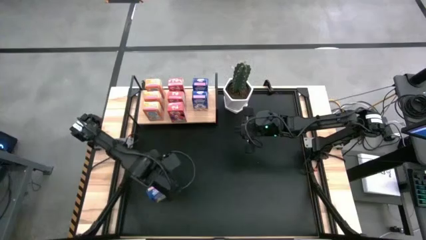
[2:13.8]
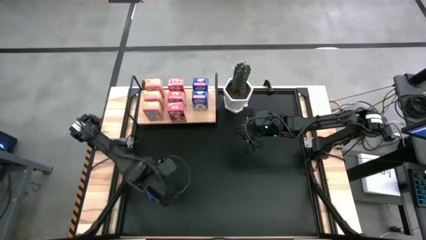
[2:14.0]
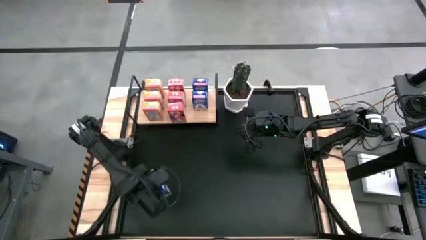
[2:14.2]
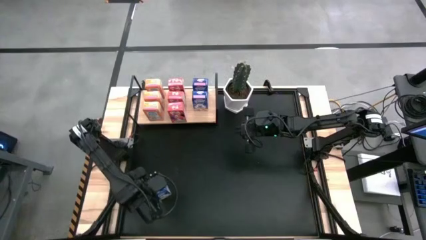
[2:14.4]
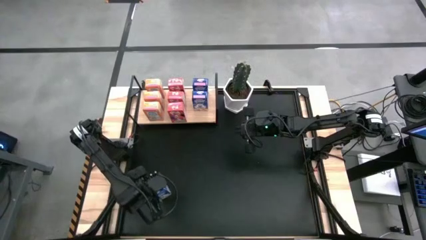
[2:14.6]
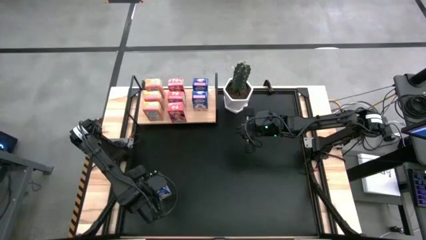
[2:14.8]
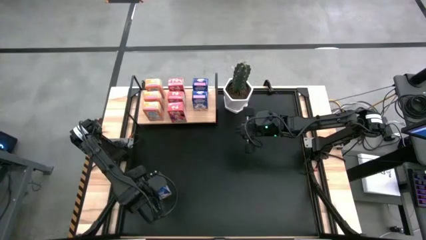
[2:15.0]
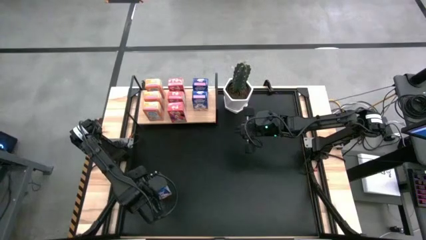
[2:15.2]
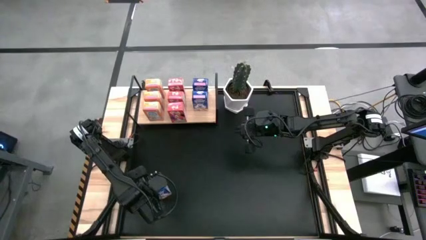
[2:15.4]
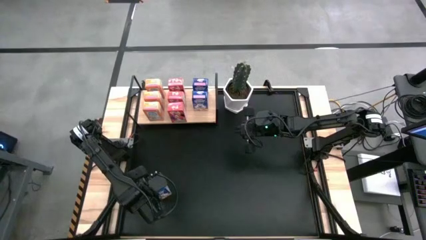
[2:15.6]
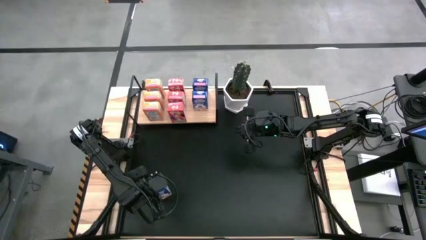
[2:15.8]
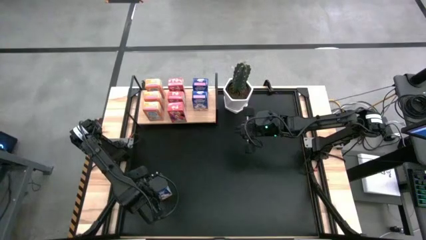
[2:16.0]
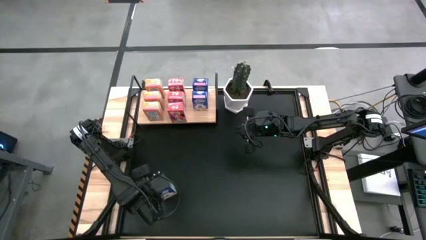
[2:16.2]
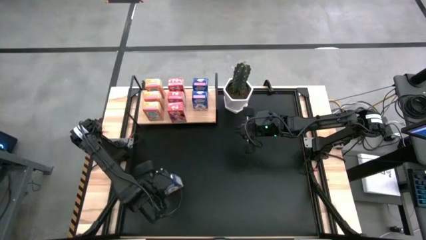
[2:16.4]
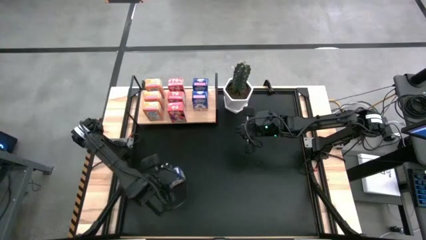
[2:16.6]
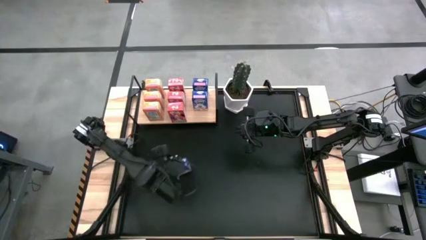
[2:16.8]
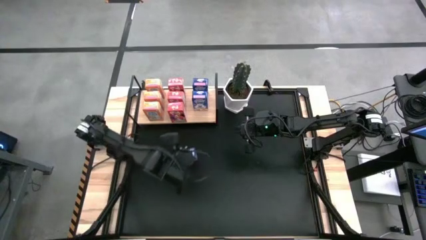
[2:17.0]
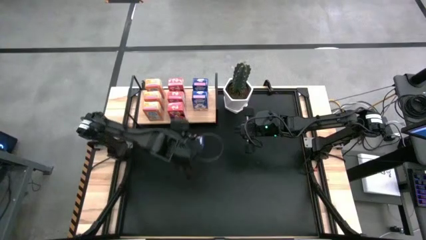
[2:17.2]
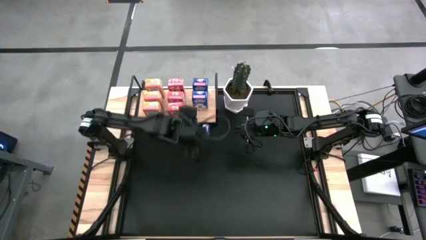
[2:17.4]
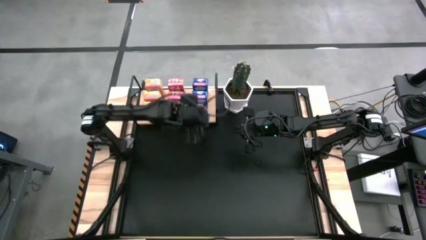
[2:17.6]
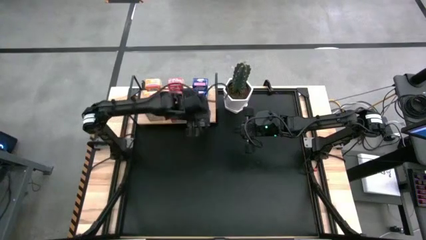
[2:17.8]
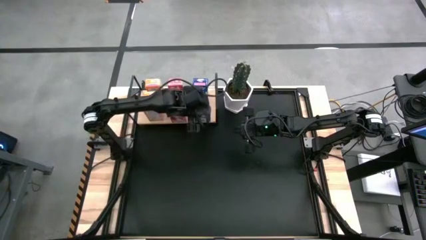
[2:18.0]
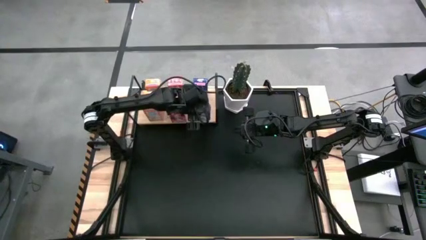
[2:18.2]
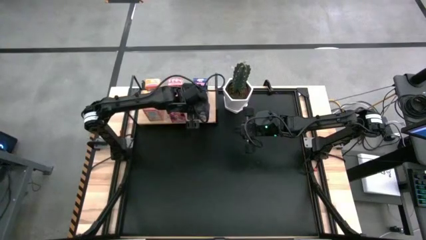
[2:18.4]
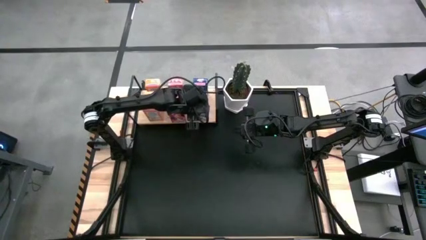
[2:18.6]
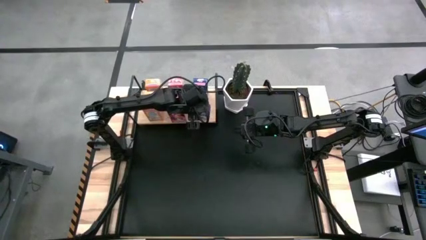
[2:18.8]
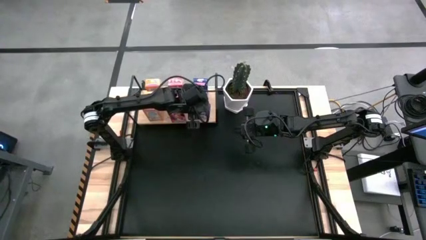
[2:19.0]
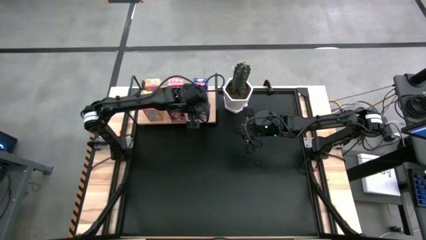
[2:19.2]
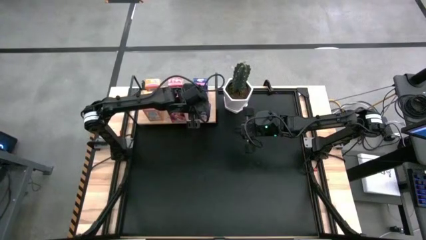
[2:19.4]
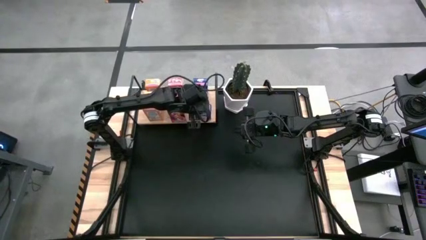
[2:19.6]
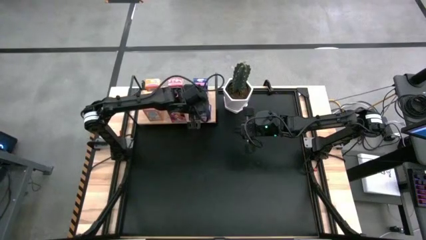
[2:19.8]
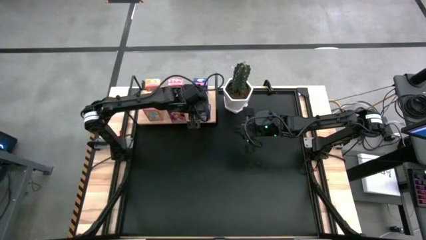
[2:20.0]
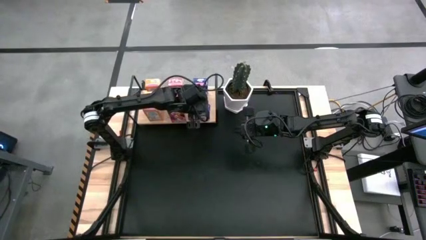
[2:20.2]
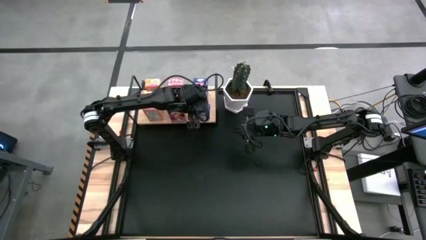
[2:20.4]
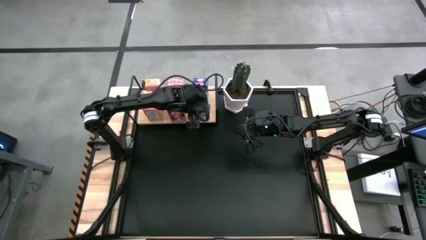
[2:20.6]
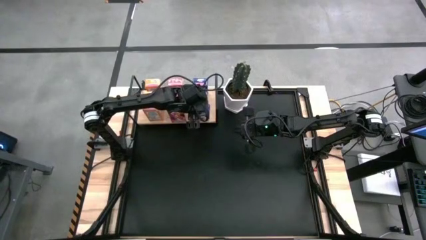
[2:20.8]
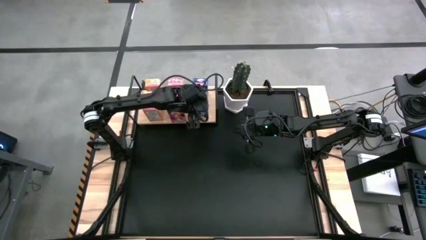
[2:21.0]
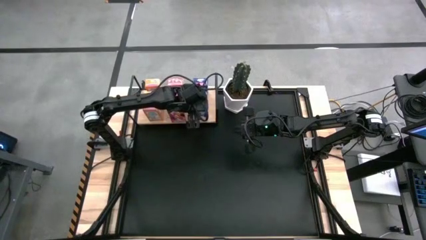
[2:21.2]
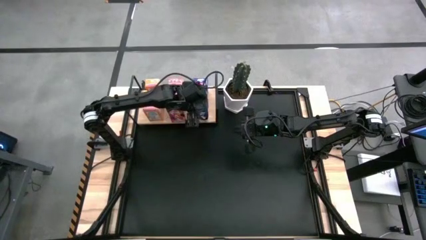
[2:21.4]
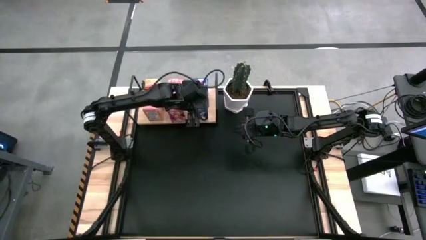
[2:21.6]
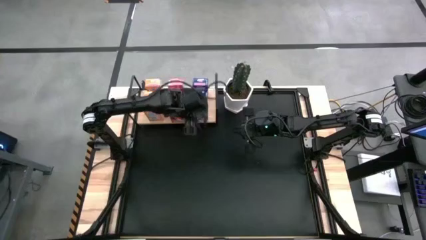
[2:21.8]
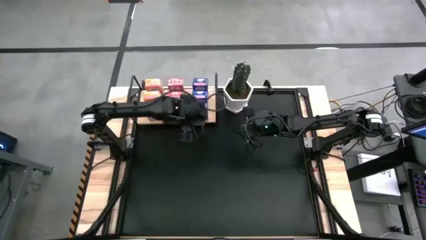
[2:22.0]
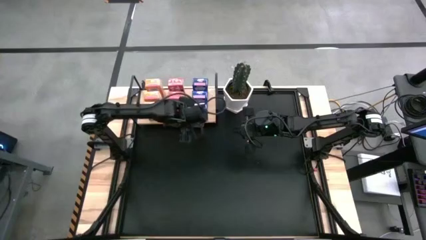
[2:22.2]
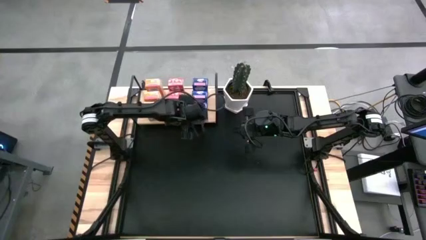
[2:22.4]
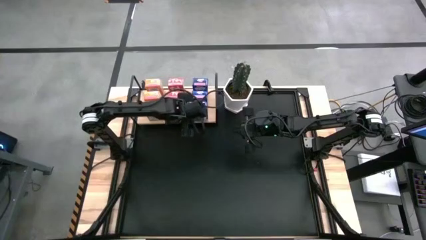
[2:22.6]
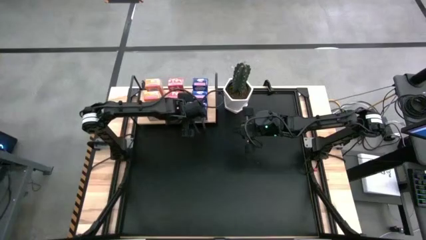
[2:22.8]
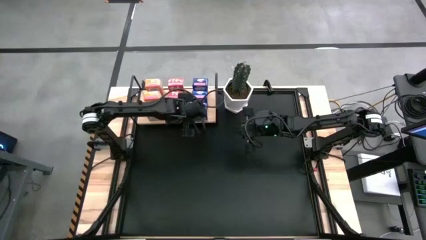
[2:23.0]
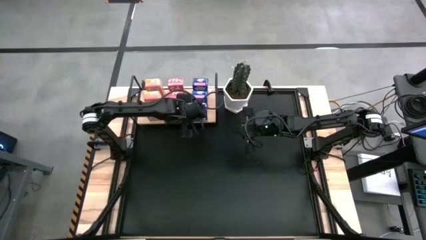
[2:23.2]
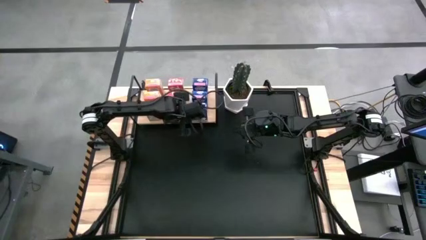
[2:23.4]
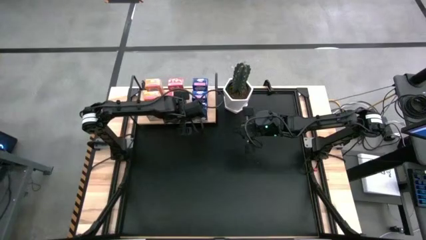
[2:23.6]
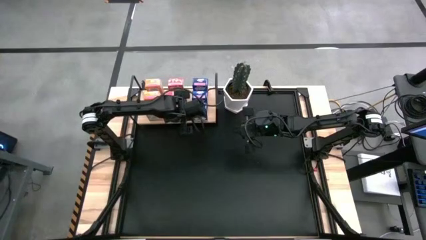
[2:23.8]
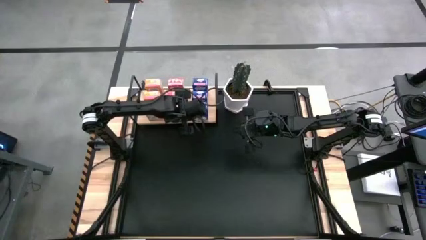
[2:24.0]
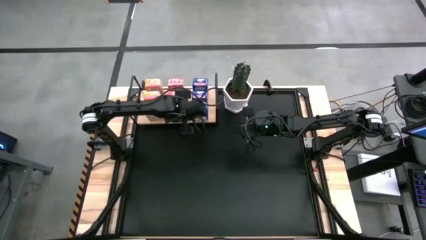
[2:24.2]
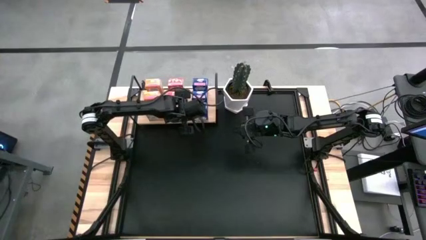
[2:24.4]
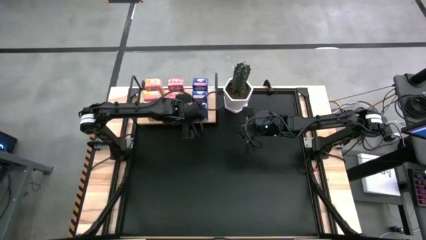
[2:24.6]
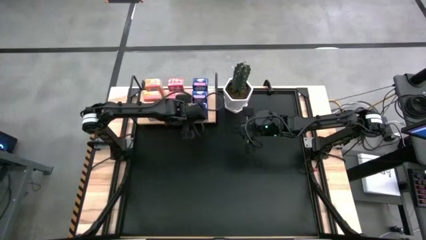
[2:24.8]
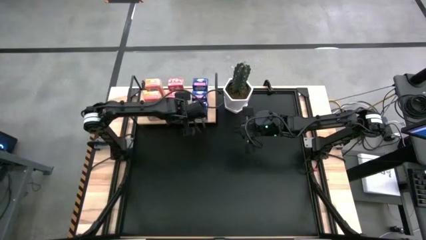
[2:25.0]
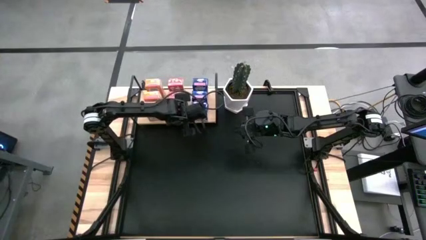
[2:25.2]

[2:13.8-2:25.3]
Task: Stack cereal on shelf
Put the blue cereal box on the shelf and align it with the other blue cereal boxes

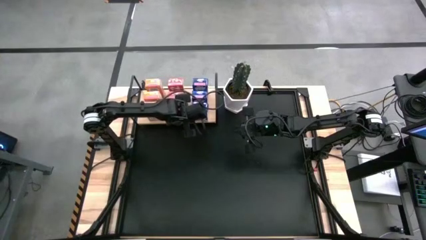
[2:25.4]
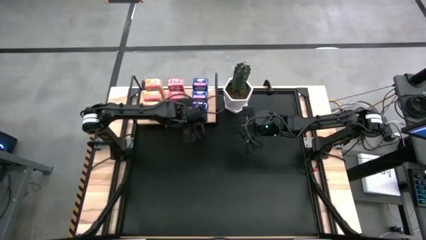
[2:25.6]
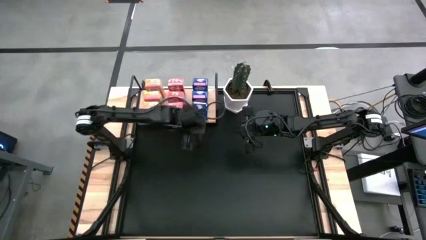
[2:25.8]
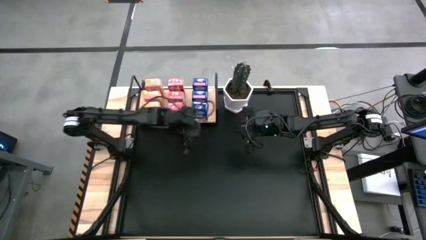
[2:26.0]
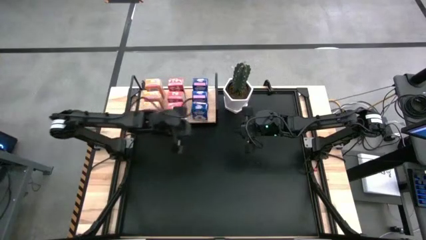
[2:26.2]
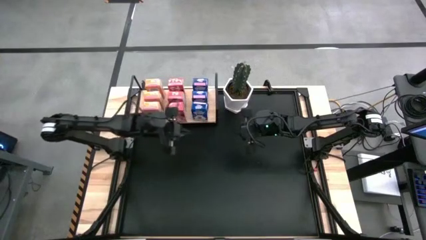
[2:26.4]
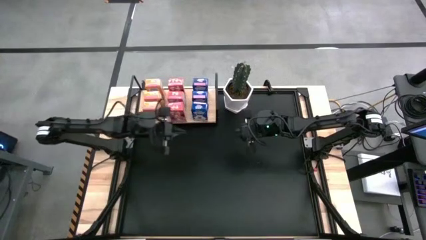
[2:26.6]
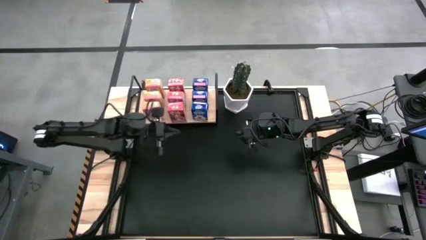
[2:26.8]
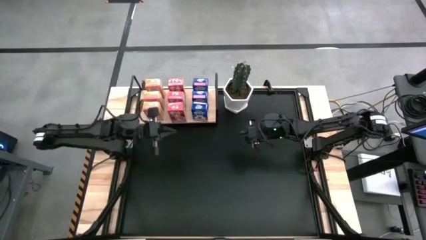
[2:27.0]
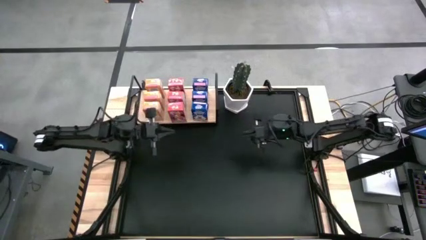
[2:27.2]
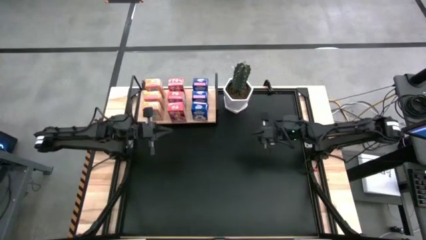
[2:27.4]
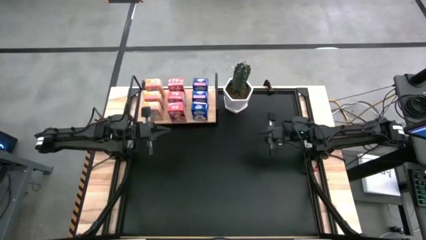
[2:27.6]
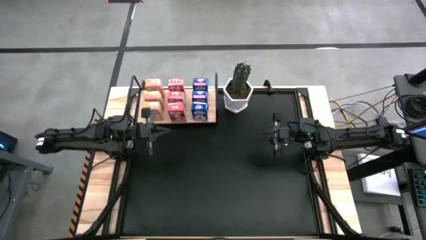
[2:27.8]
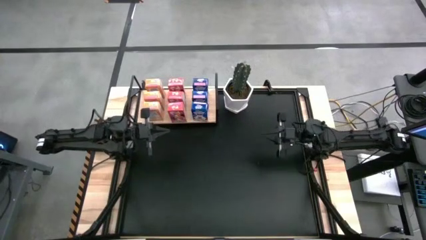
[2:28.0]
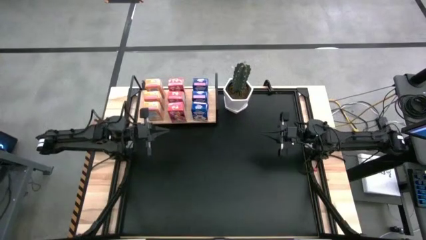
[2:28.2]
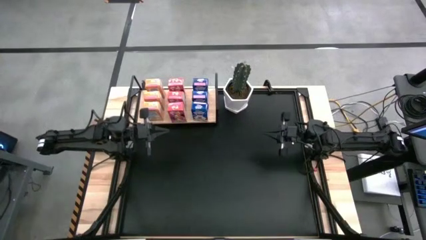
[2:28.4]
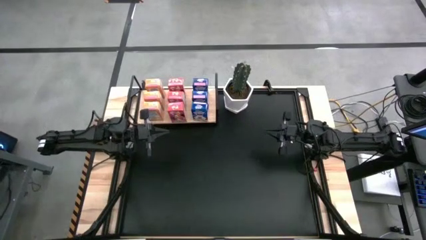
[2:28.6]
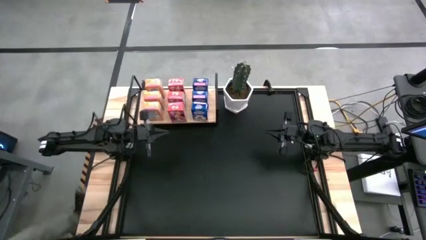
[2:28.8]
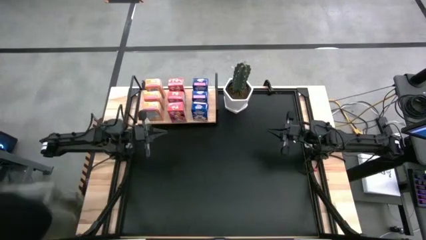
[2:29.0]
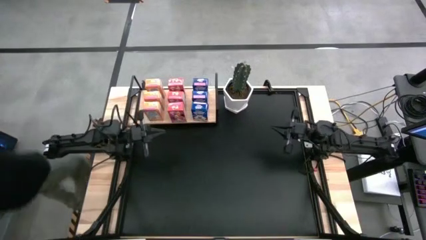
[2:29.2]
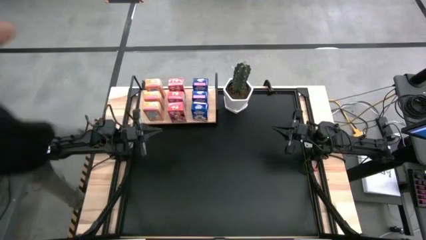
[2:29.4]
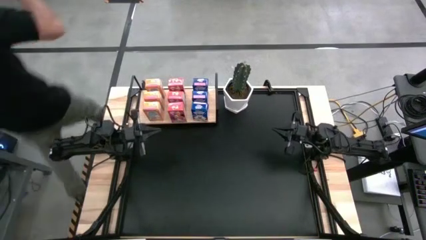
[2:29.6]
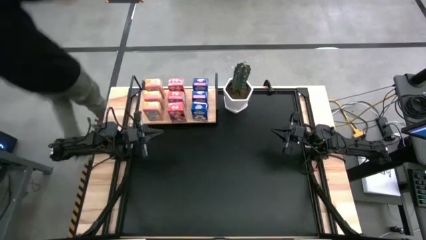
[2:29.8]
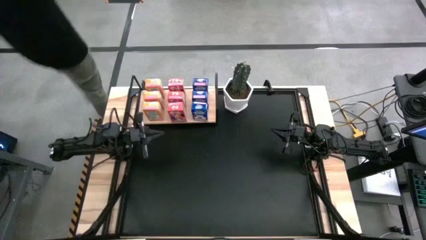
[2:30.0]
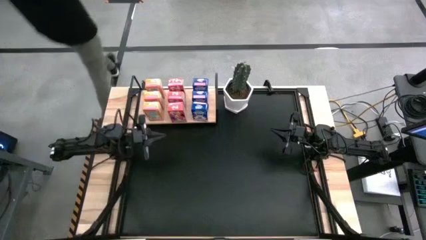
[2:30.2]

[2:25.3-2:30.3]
Return to Home Position
